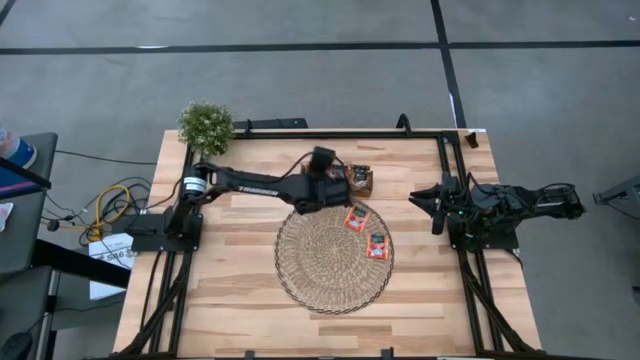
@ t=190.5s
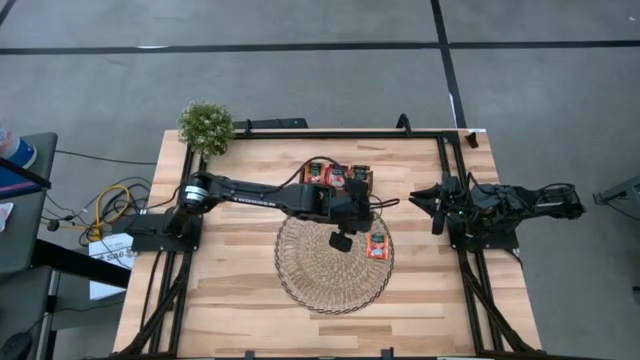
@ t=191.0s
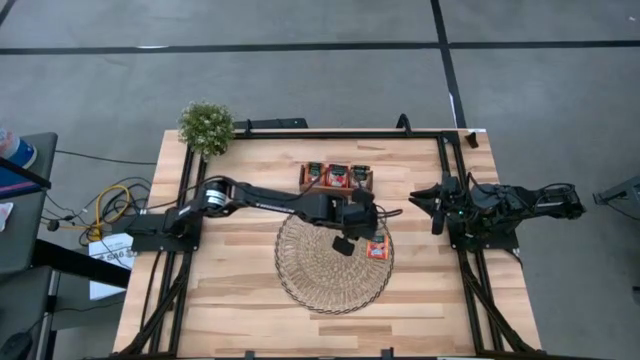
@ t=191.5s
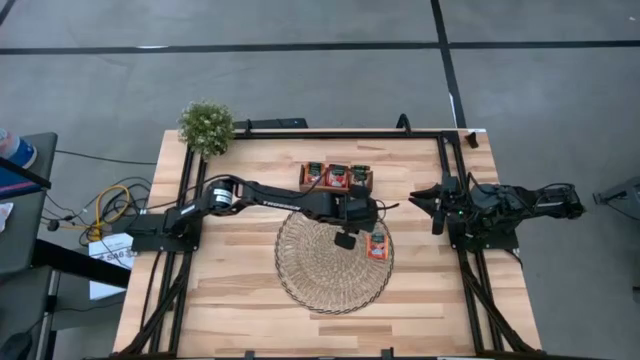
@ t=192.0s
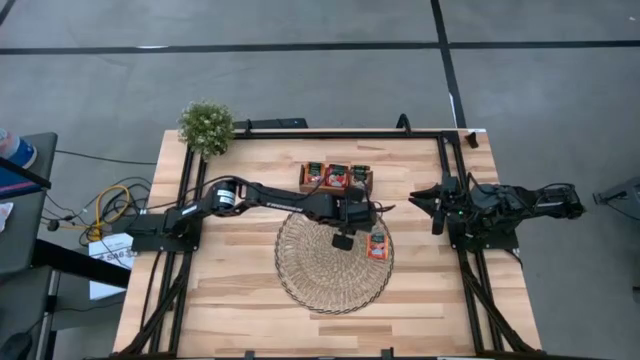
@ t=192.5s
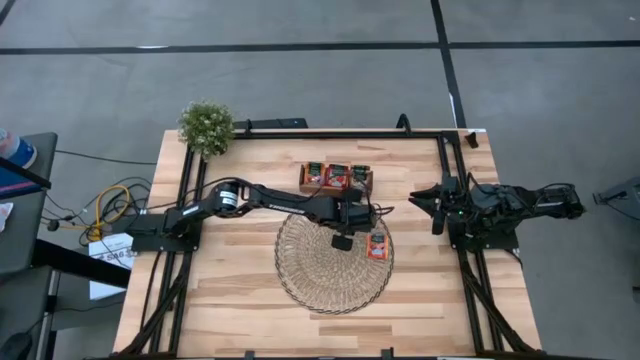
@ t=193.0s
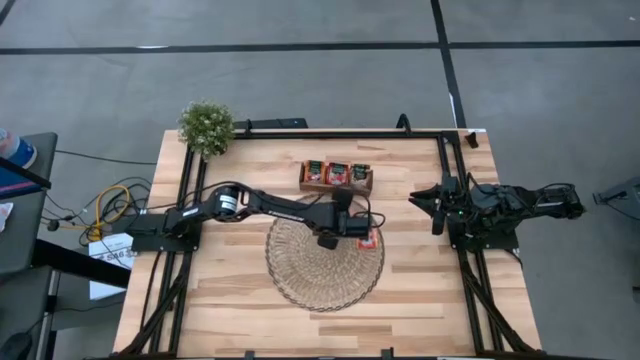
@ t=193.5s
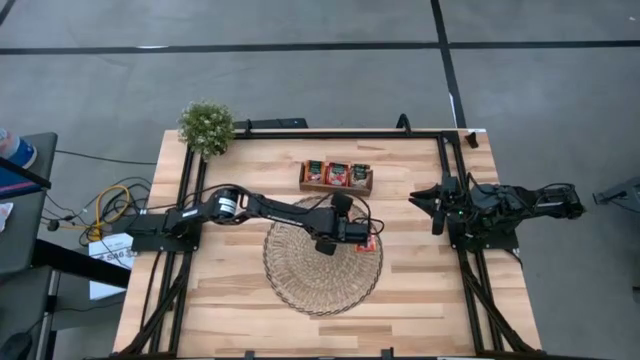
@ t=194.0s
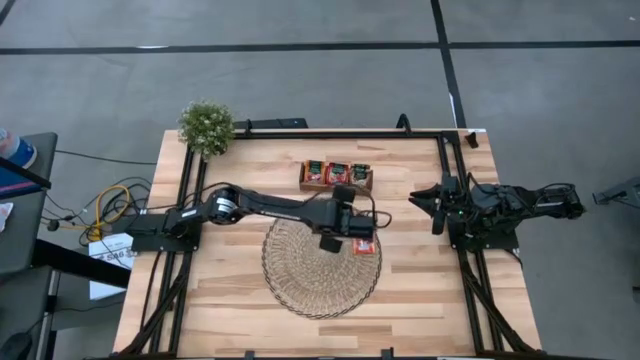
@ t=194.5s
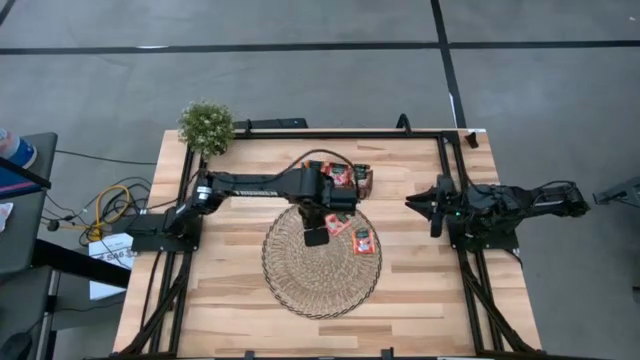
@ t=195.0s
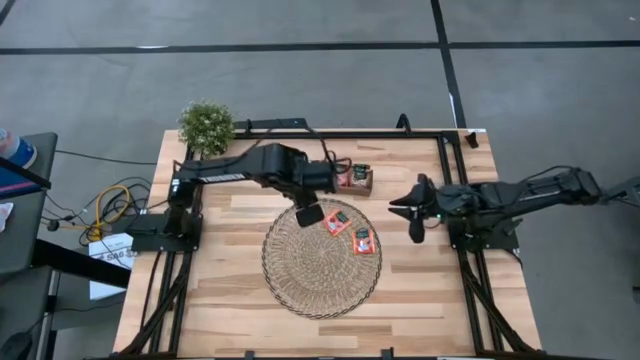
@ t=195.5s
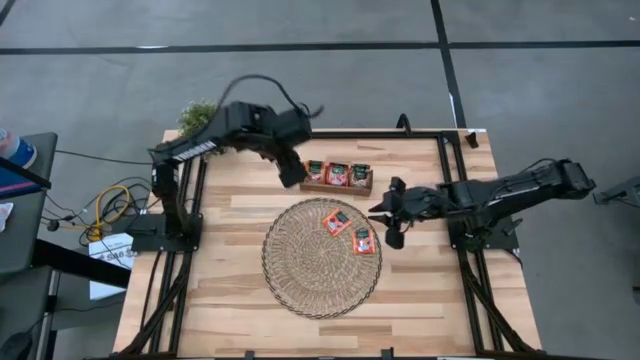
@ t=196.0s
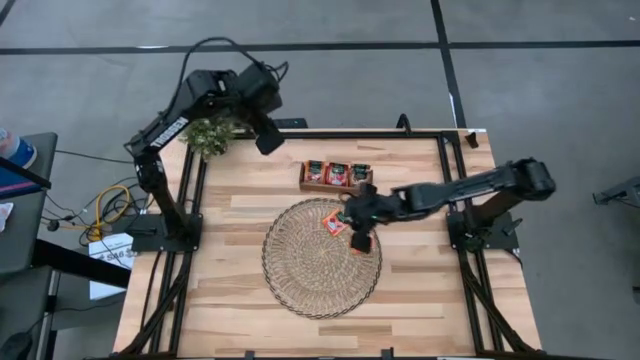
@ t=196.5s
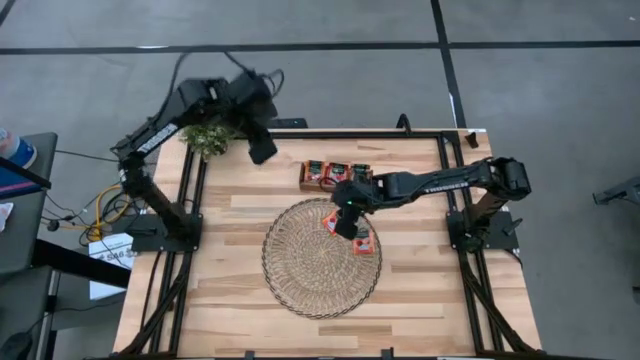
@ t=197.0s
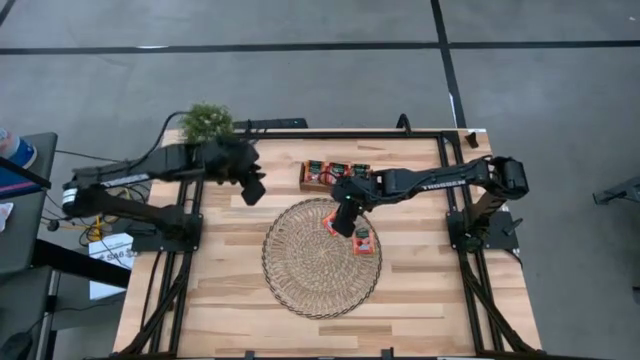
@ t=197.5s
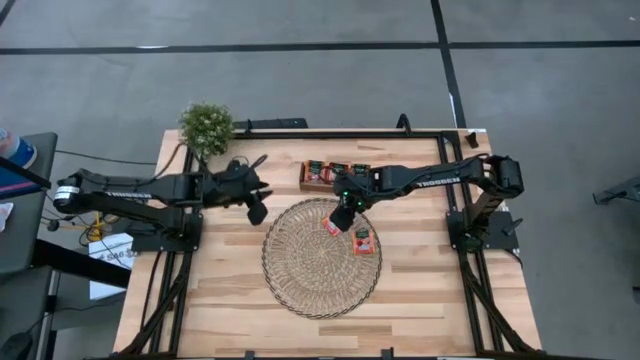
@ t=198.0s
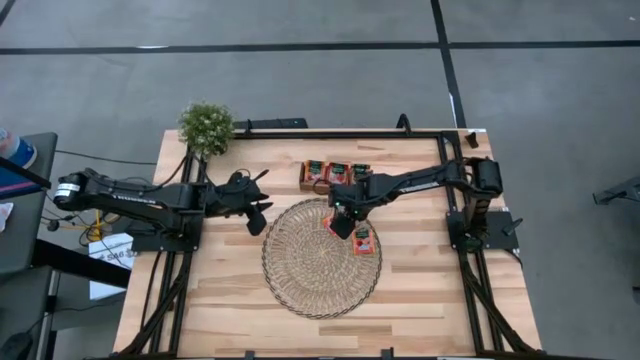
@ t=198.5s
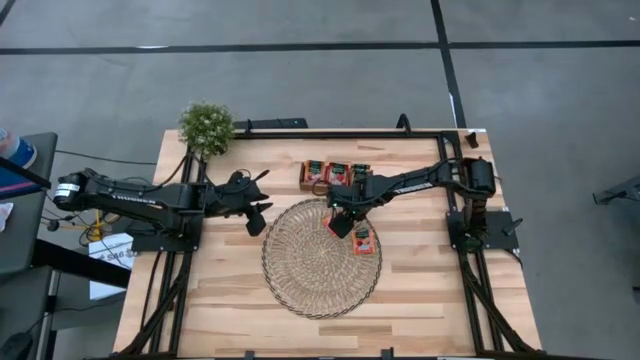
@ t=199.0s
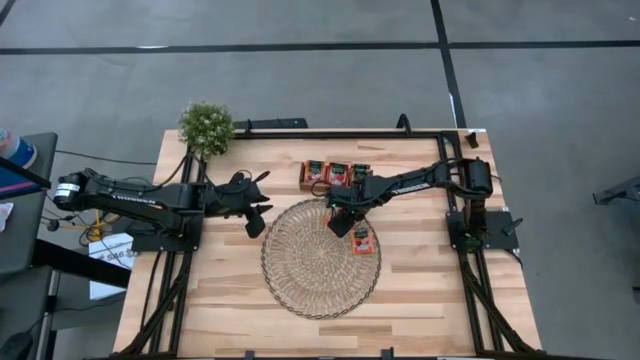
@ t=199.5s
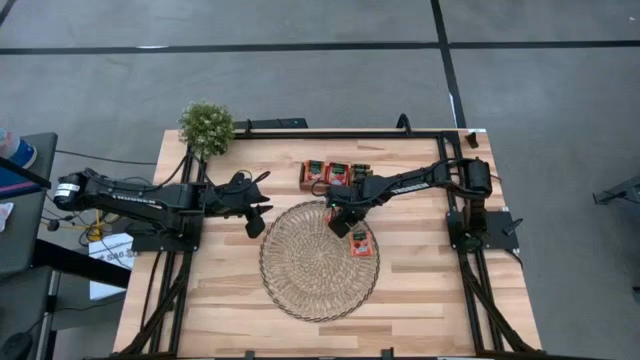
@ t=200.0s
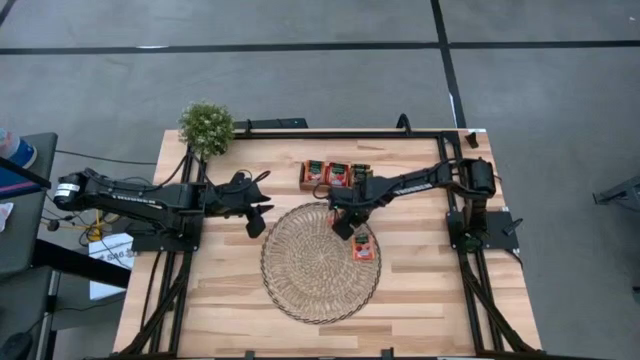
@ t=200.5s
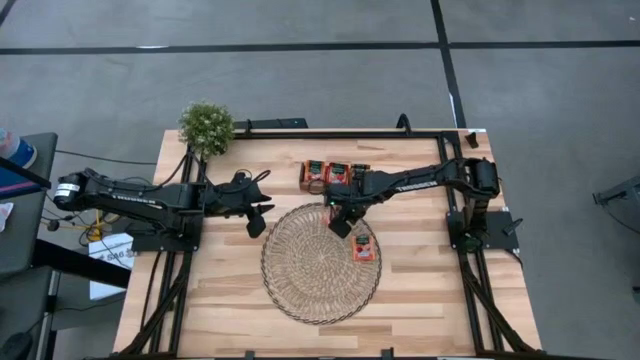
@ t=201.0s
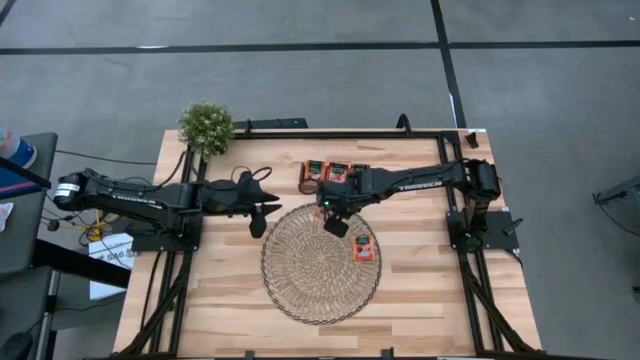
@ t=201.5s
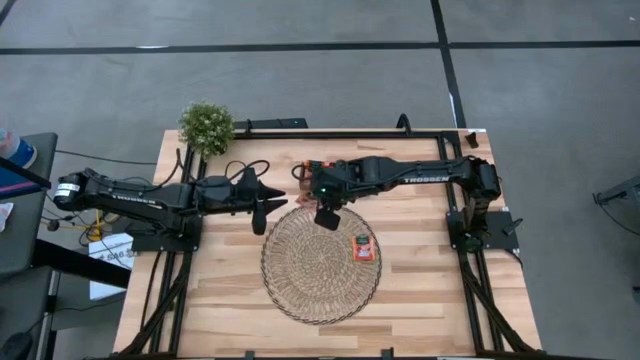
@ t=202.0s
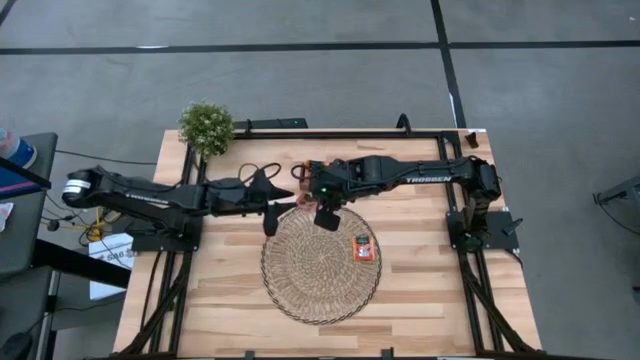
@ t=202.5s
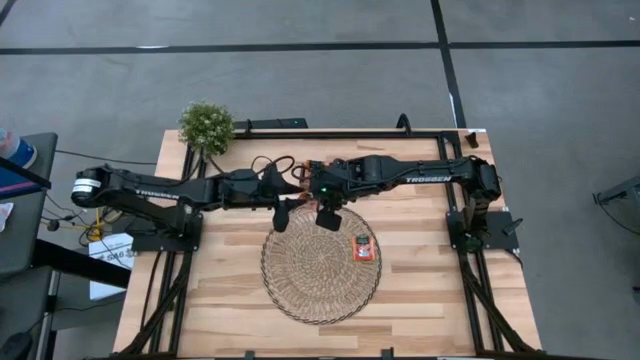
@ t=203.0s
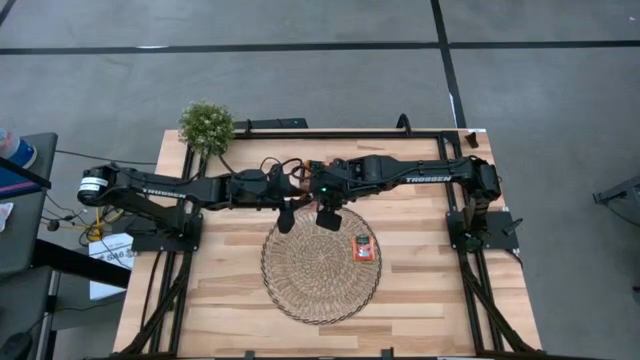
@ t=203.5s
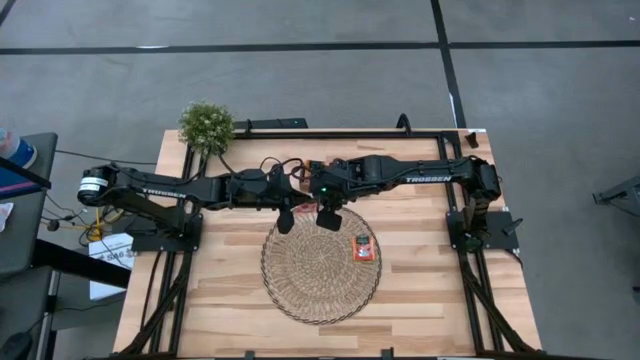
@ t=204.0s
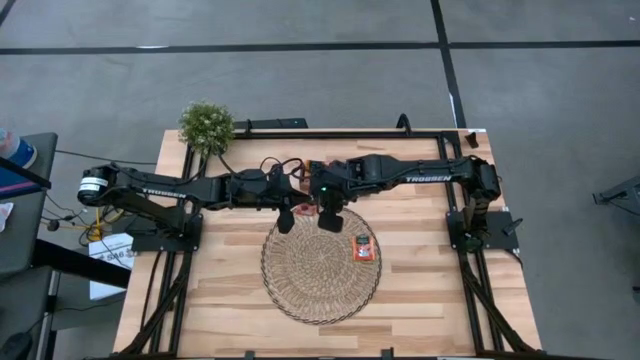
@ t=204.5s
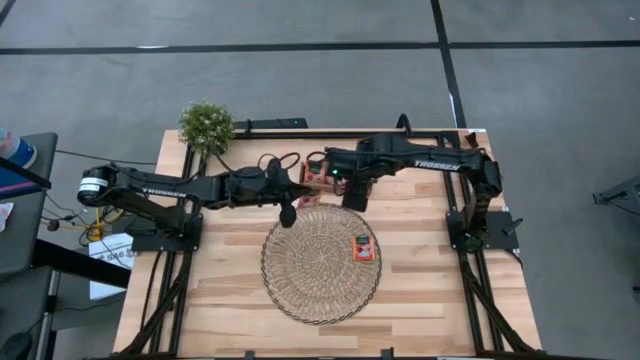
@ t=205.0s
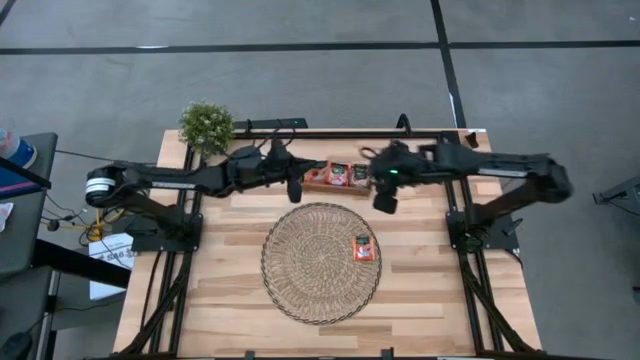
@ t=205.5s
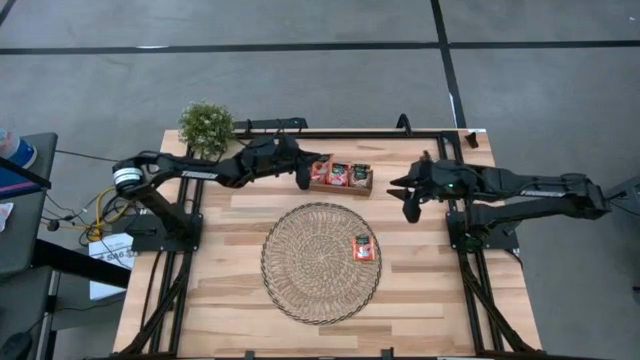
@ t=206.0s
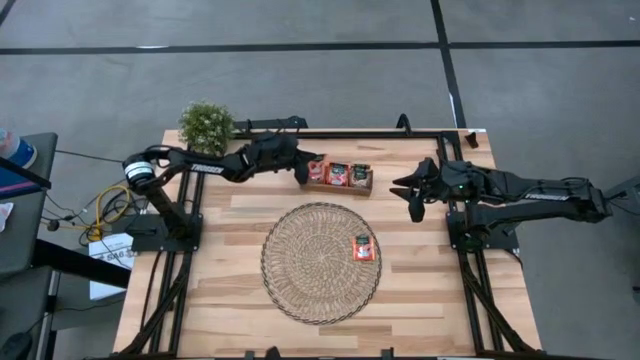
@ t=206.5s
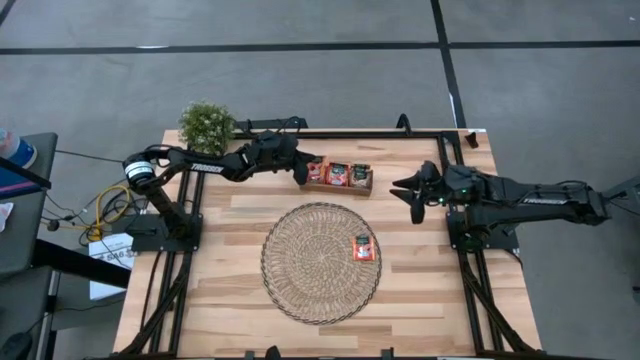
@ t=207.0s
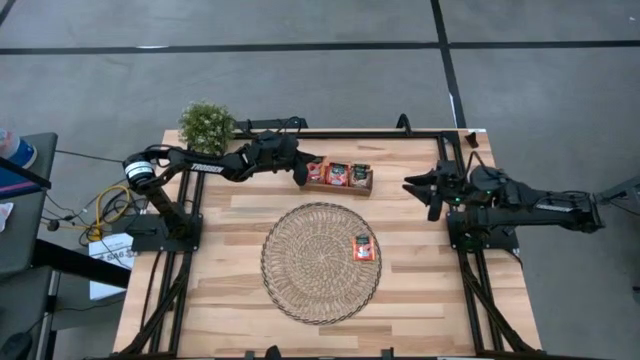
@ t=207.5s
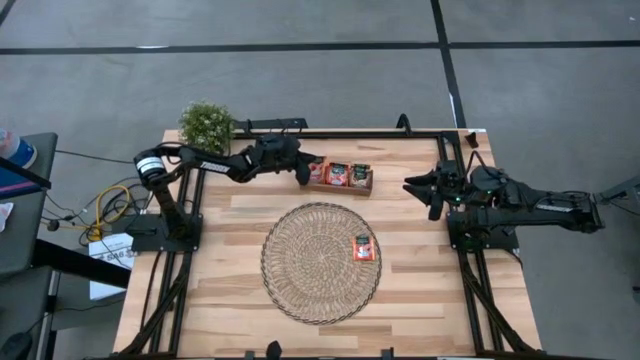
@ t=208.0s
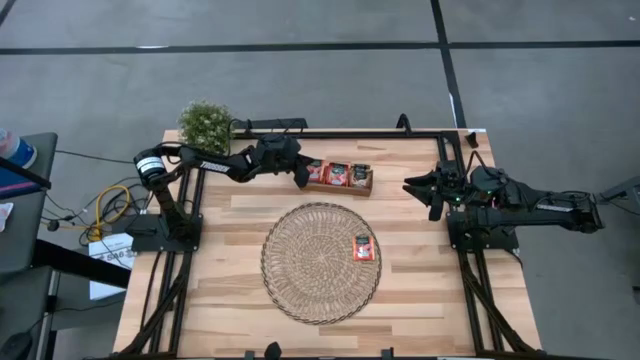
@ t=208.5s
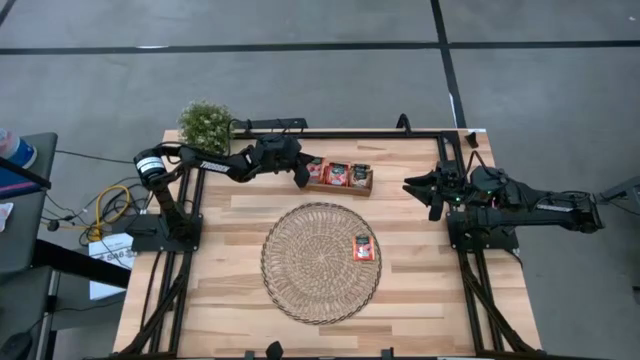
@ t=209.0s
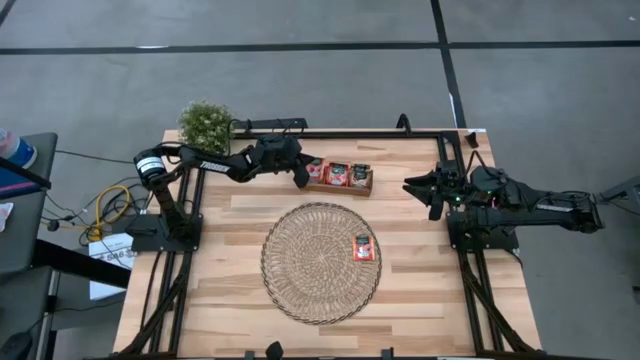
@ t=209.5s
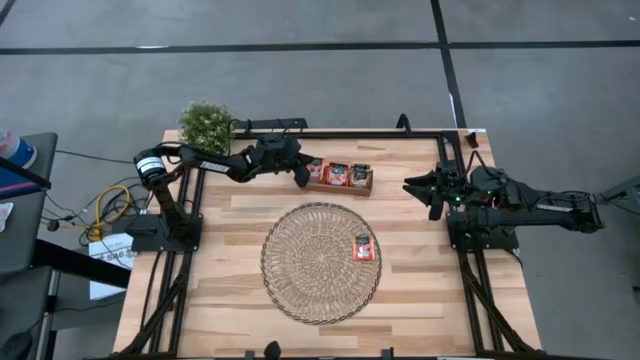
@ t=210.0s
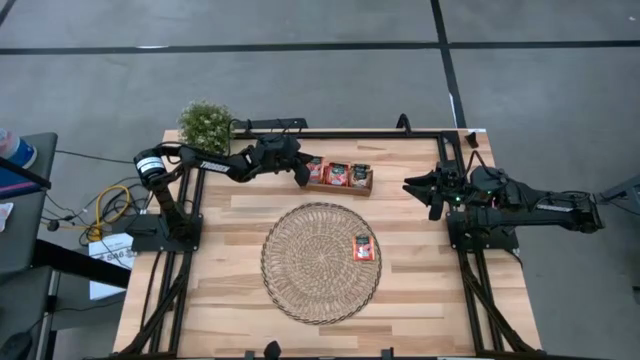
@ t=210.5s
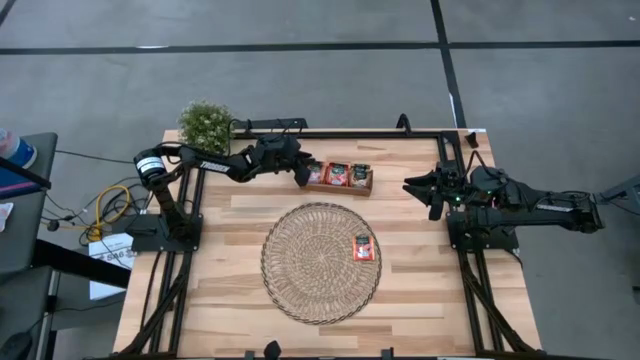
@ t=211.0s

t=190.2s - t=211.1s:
Task: Pick & Place Tea
Put the orange tea bag into the left section of the wooden organizer
